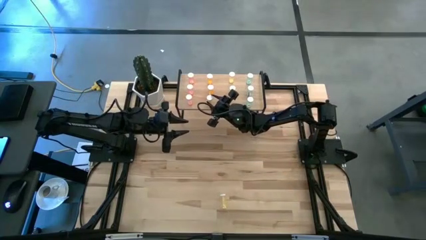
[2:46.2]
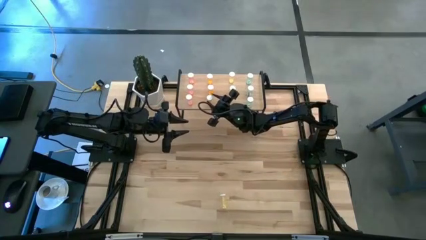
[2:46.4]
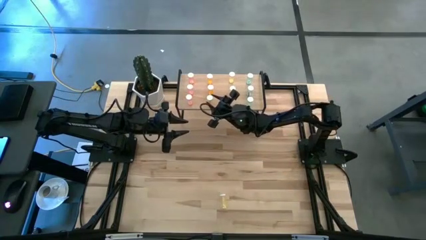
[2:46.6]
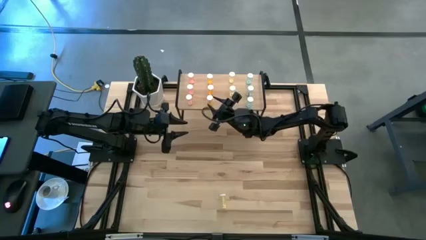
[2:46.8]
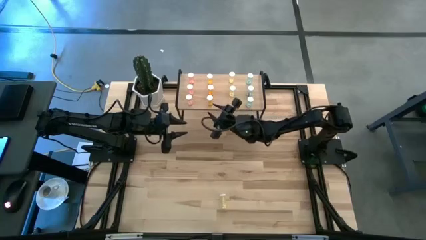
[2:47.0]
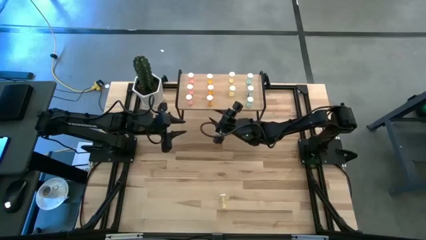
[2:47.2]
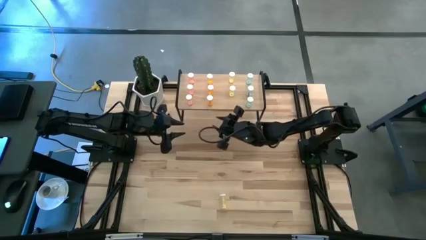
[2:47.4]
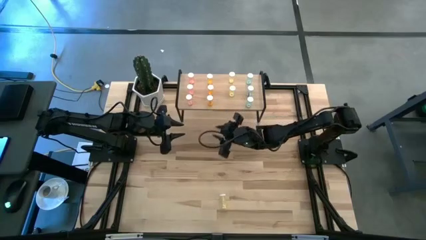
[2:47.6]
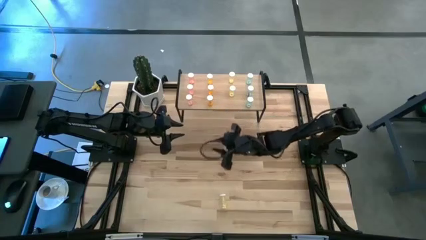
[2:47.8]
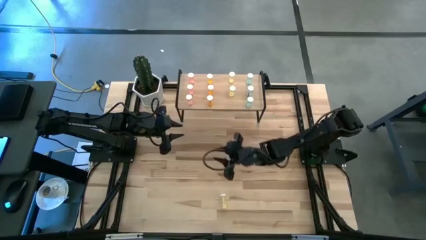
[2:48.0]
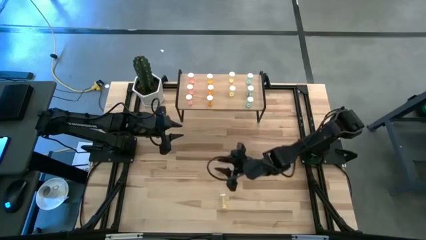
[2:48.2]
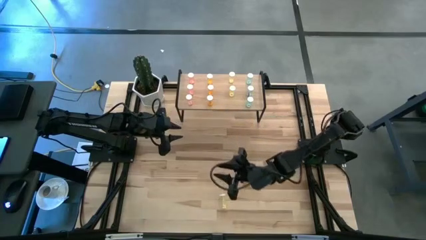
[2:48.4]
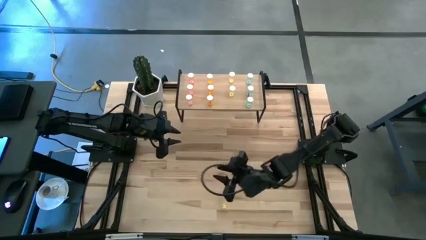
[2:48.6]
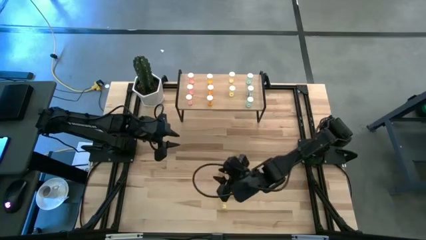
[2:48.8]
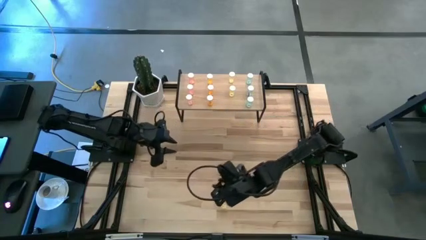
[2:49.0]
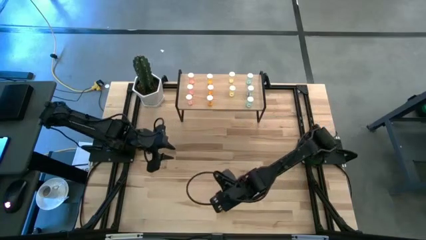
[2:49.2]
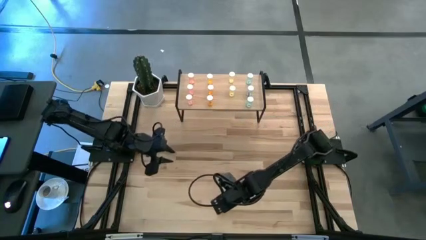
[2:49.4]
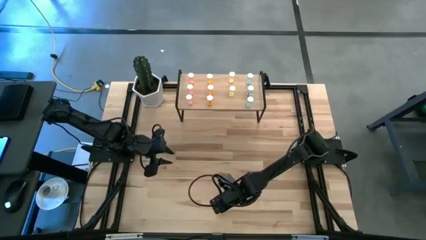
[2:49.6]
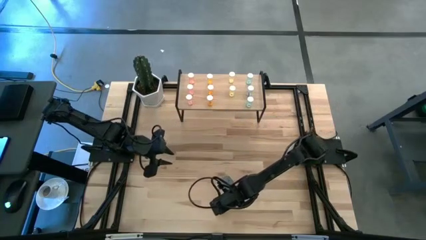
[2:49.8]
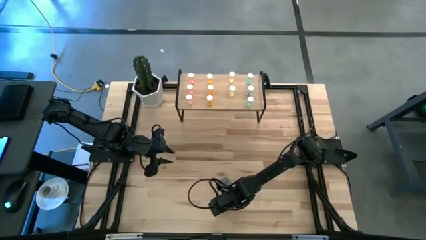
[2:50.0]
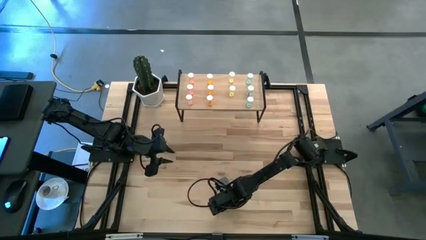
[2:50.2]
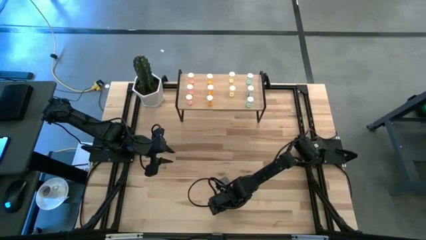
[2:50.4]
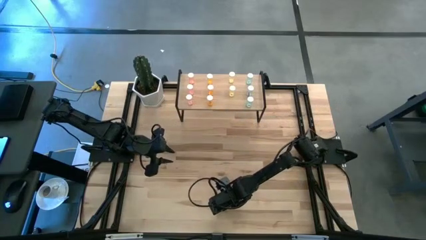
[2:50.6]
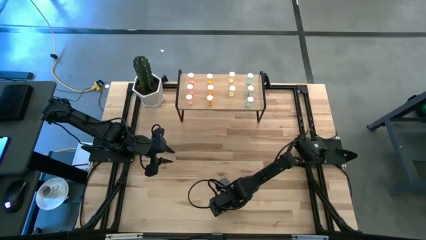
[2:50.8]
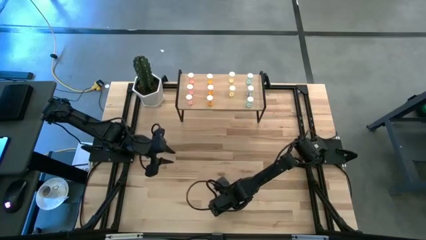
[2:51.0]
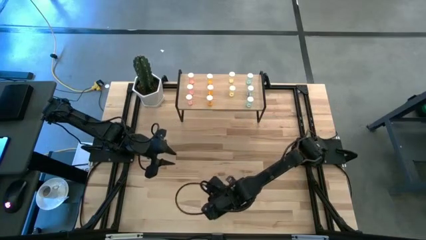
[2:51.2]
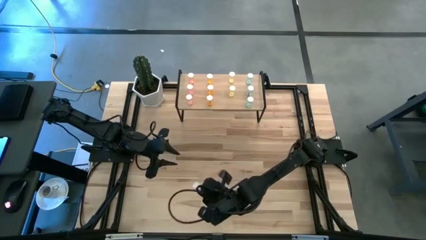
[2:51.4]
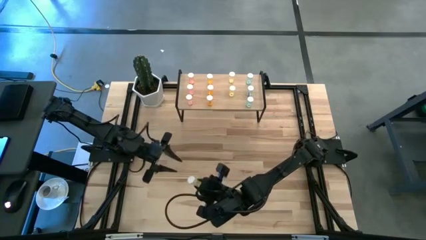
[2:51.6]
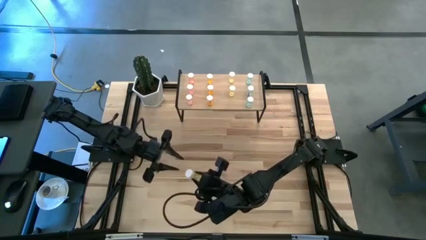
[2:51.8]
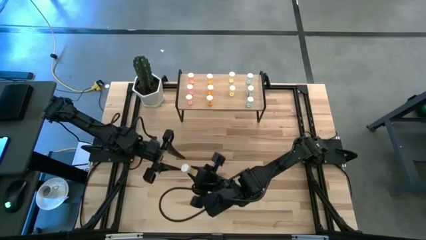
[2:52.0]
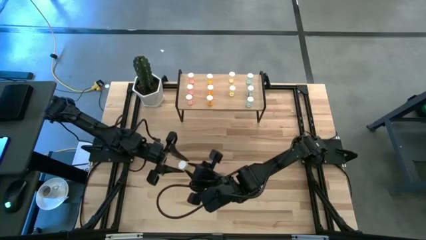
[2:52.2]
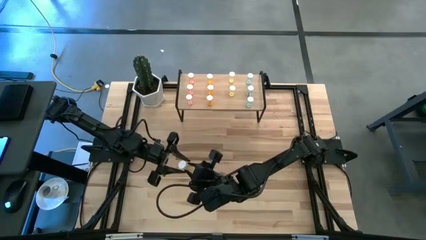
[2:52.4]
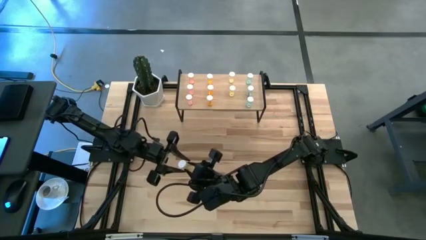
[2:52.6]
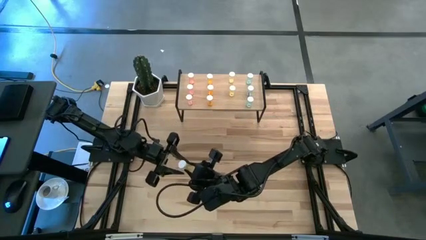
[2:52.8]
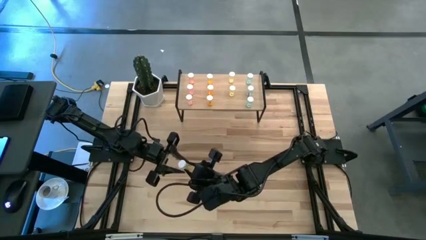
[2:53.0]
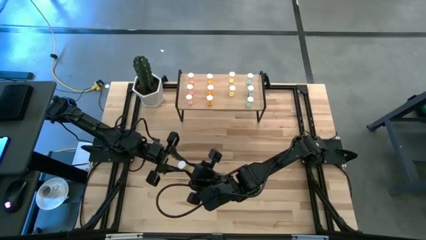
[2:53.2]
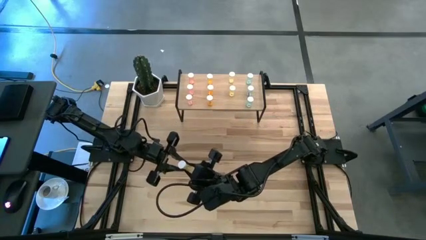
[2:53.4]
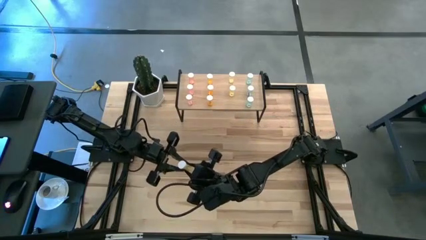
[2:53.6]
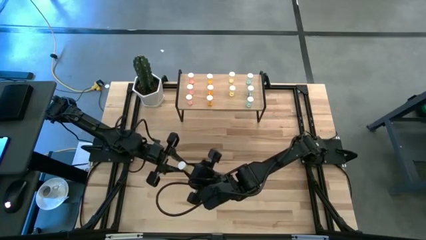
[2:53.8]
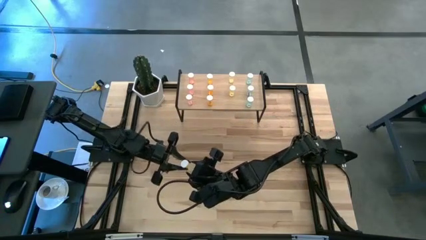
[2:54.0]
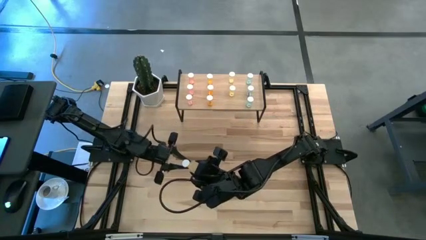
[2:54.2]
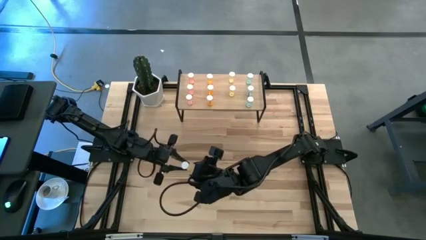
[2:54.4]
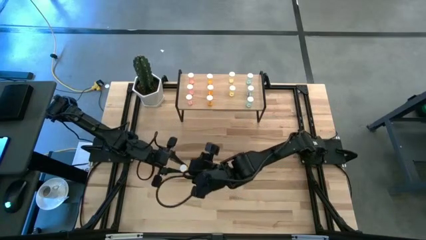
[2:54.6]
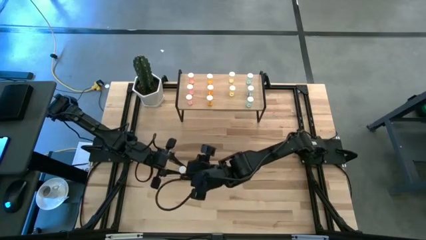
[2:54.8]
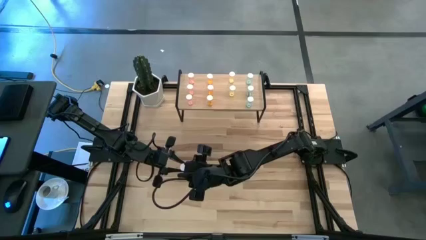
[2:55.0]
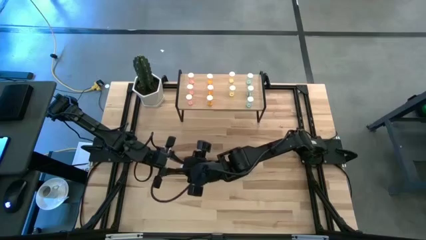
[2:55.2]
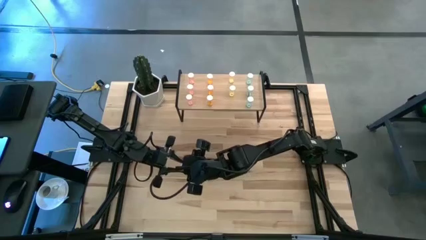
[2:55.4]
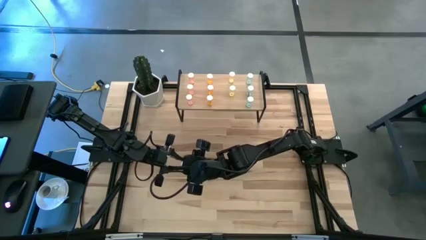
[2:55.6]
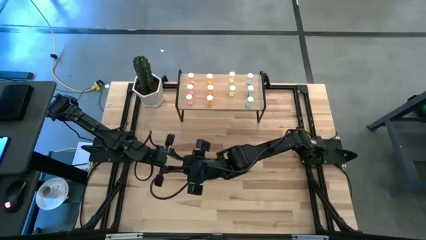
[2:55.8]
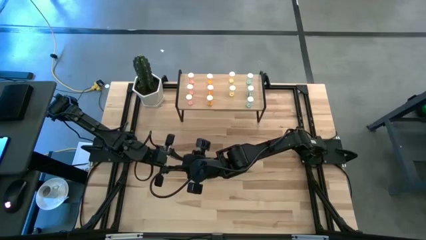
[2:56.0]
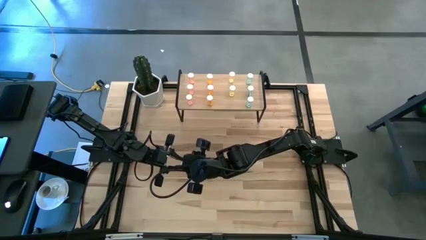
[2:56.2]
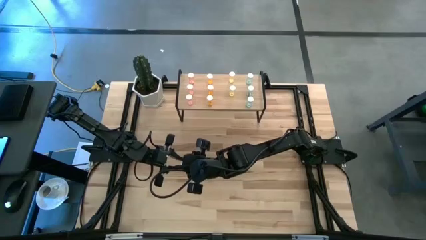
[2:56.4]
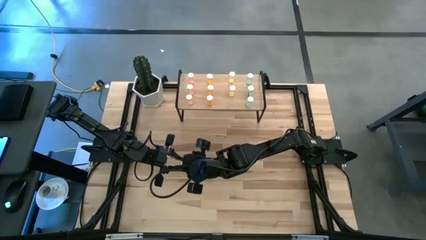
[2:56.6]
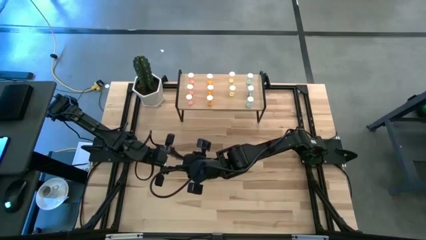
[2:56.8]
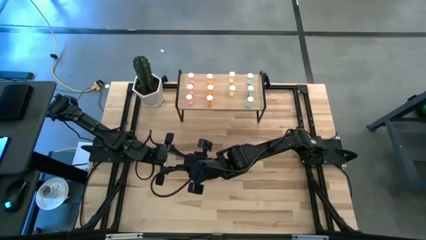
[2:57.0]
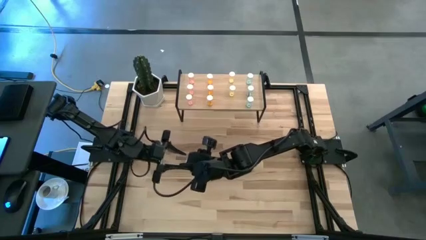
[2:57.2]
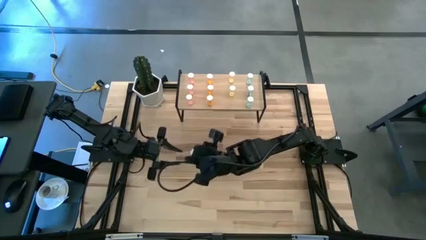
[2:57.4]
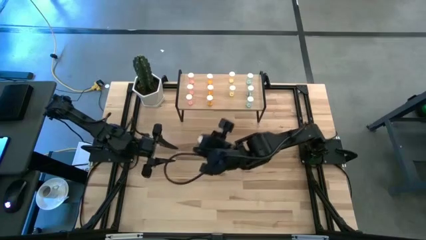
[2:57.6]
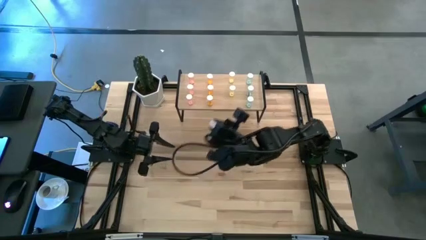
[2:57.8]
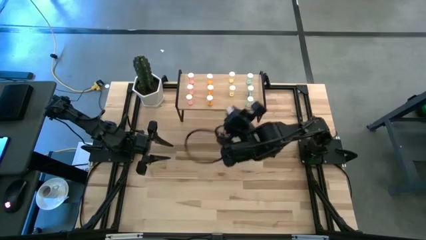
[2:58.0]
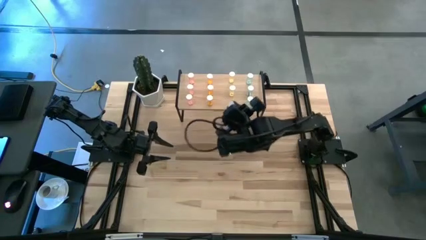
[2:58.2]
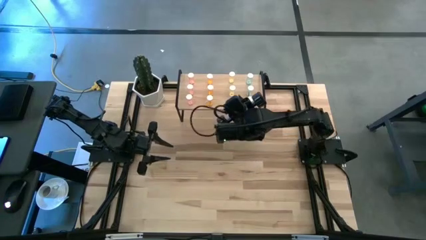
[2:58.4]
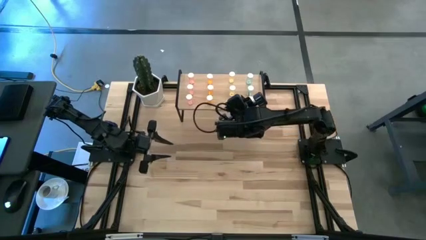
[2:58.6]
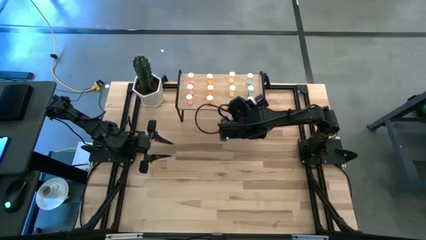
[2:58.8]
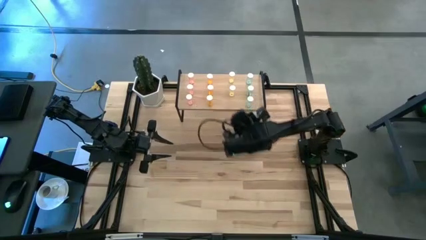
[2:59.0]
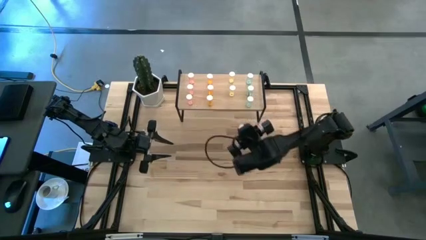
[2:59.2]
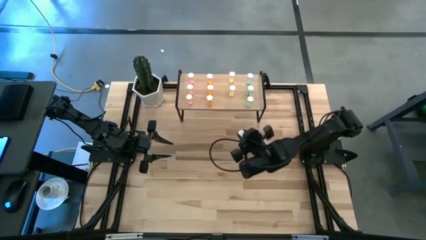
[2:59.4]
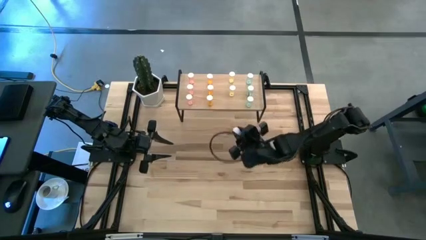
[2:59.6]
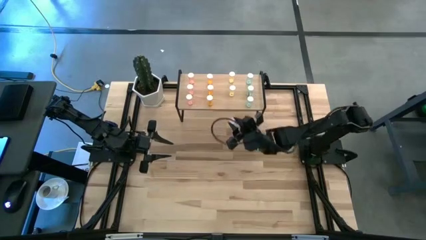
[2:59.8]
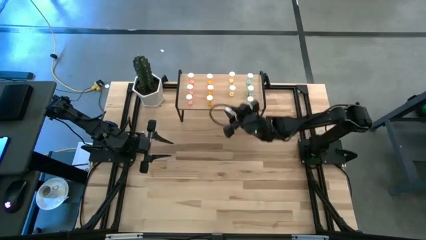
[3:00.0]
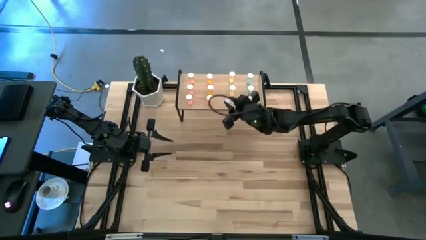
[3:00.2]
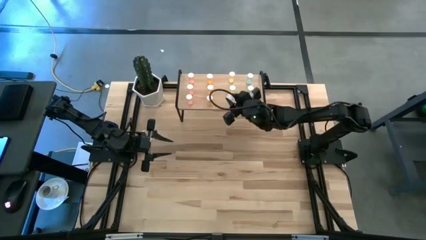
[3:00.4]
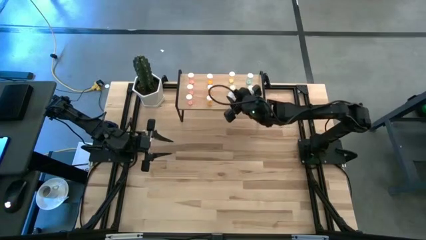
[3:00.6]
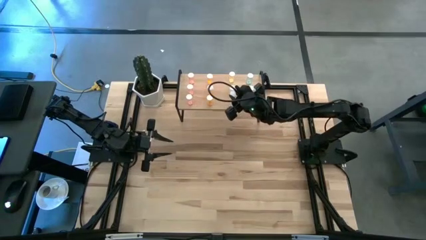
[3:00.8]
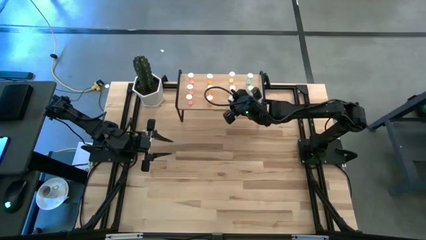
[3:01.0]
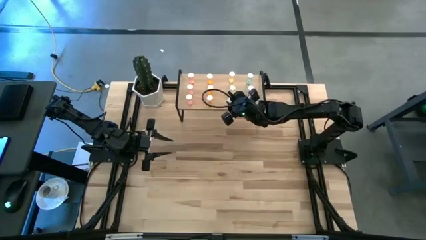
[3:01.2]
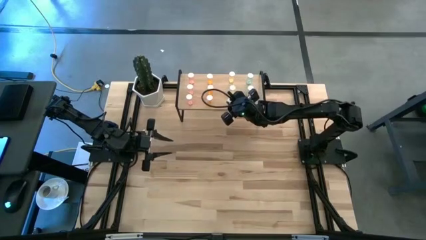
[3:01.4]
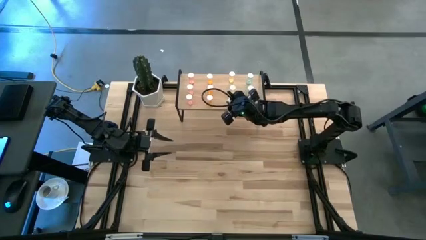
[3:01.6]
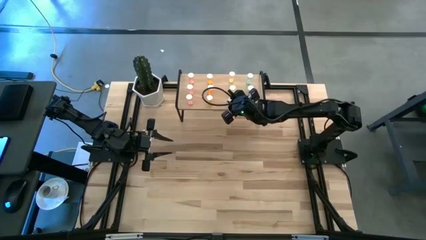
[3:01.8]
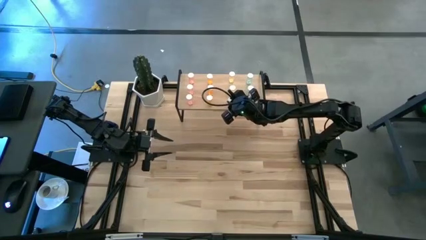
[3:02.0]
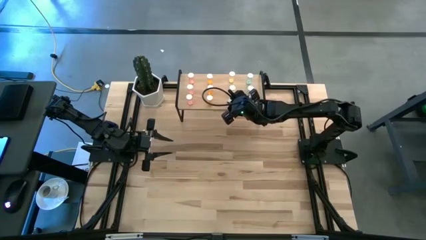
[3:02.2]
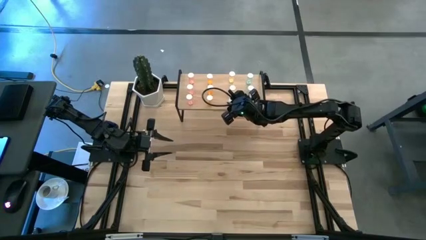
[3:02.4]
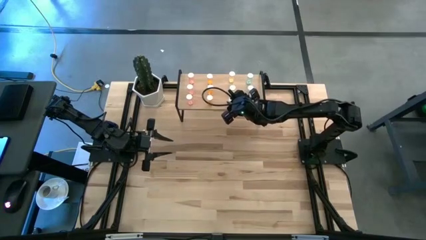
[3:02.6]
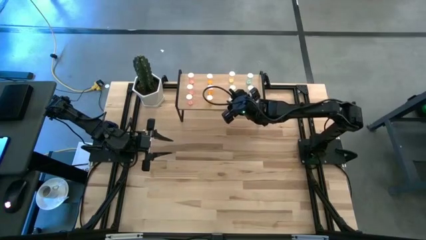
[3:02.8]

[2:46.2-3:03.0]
Task: Pick and place medicine bottles onto shelf by color
Put the yellow pill bottle aligned with other yellow pill bottles on the shelf
